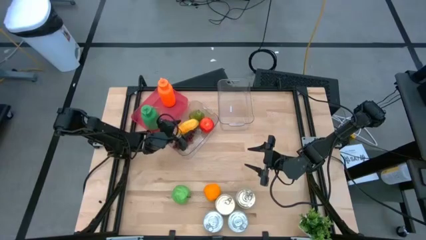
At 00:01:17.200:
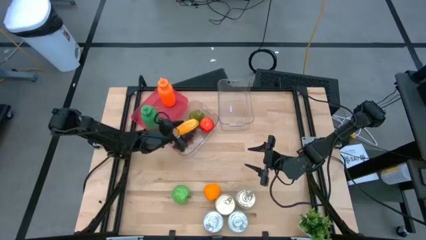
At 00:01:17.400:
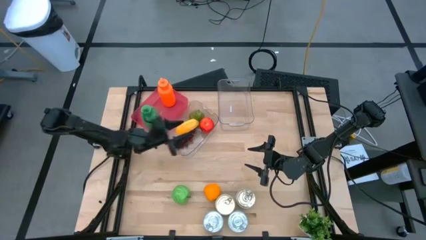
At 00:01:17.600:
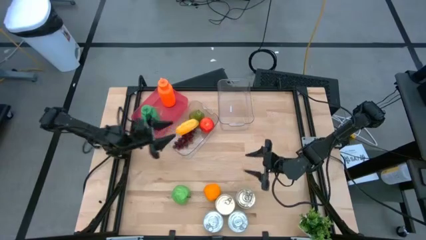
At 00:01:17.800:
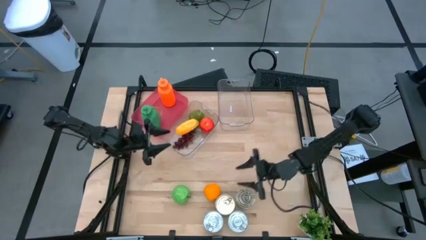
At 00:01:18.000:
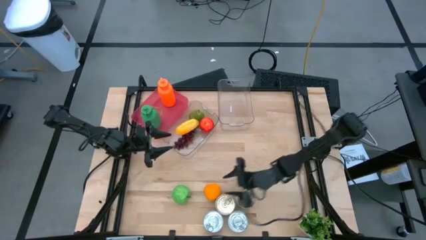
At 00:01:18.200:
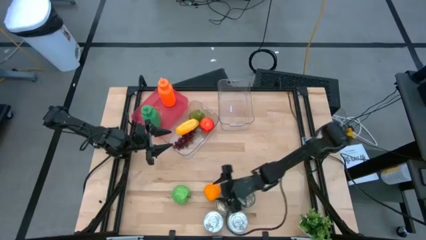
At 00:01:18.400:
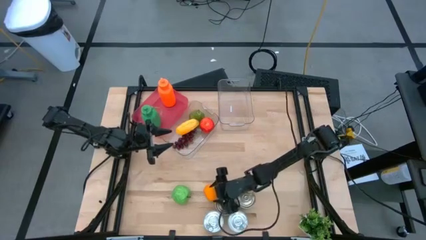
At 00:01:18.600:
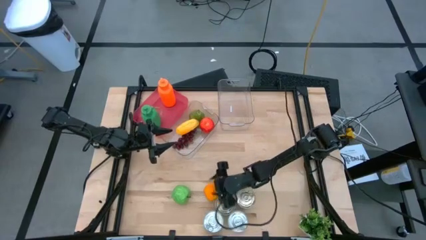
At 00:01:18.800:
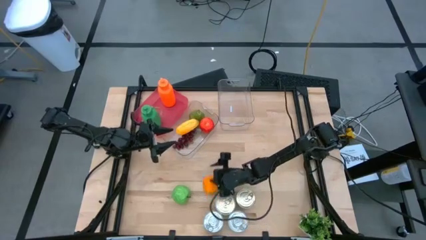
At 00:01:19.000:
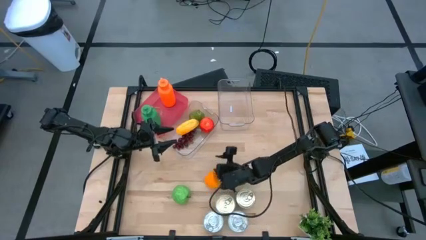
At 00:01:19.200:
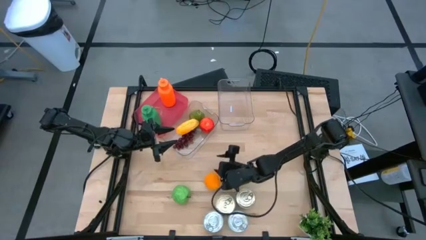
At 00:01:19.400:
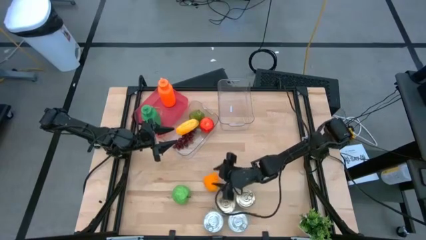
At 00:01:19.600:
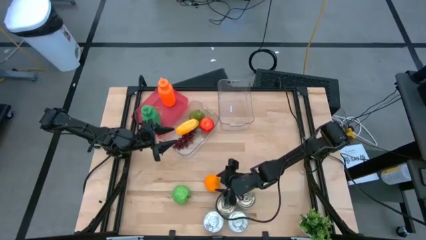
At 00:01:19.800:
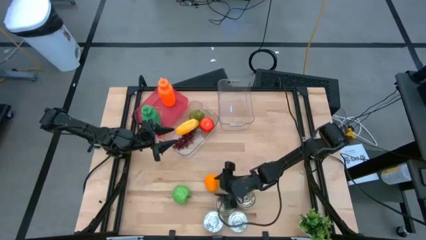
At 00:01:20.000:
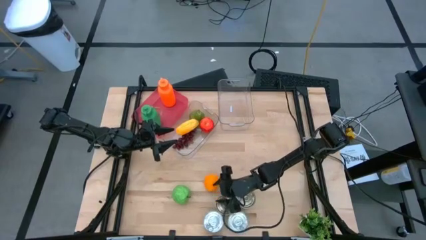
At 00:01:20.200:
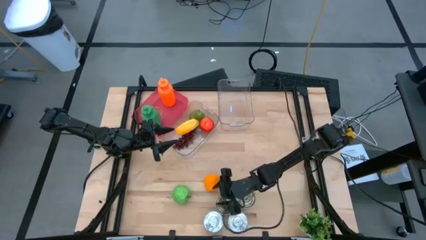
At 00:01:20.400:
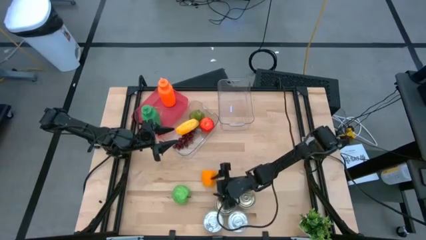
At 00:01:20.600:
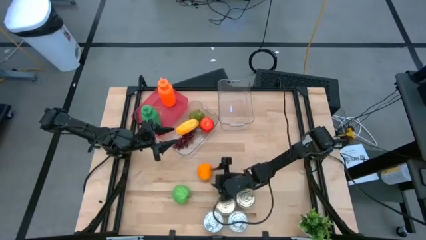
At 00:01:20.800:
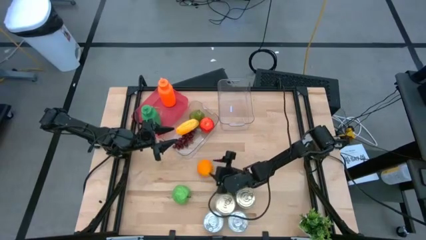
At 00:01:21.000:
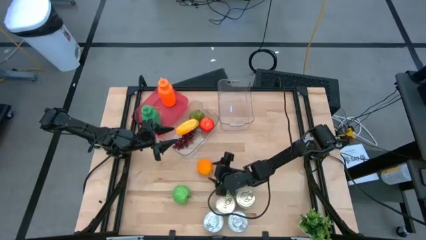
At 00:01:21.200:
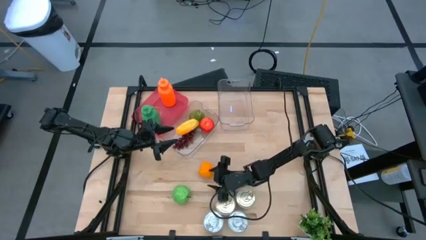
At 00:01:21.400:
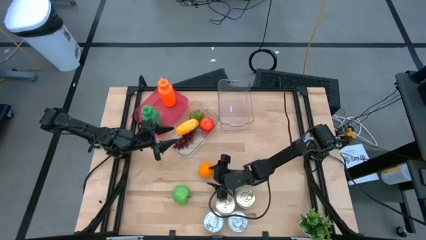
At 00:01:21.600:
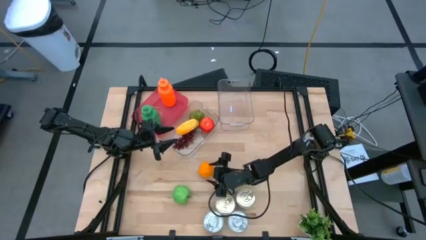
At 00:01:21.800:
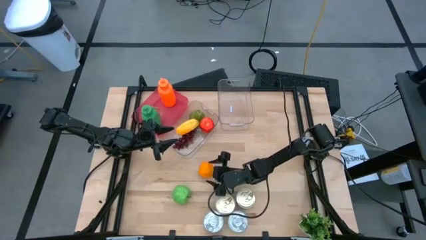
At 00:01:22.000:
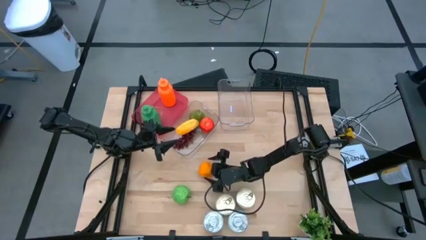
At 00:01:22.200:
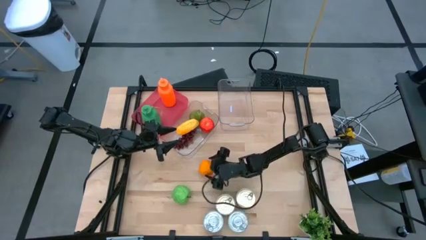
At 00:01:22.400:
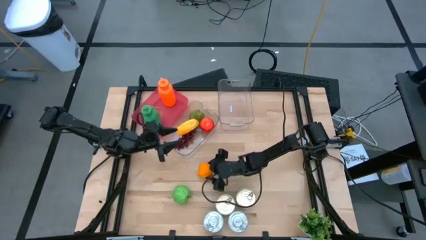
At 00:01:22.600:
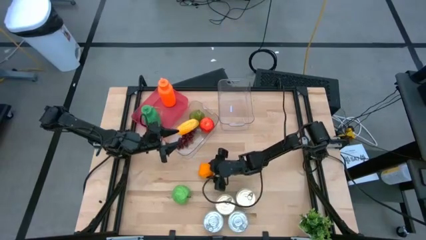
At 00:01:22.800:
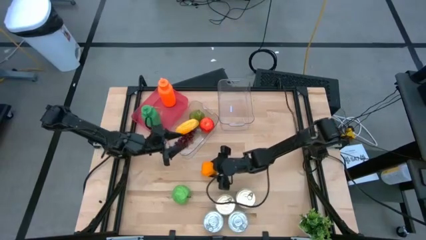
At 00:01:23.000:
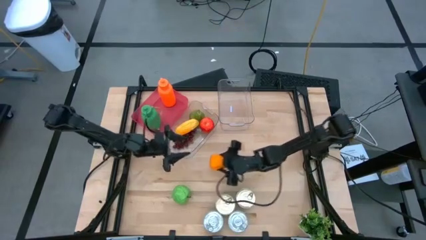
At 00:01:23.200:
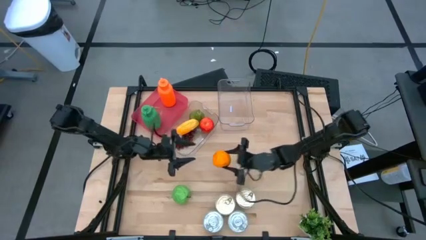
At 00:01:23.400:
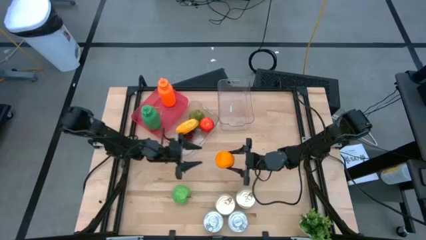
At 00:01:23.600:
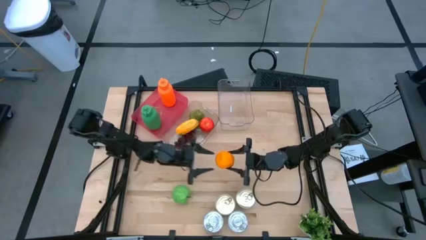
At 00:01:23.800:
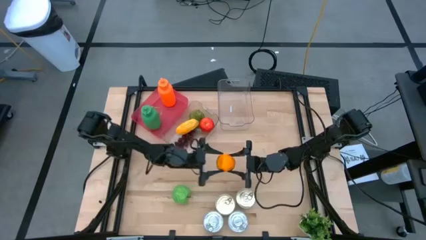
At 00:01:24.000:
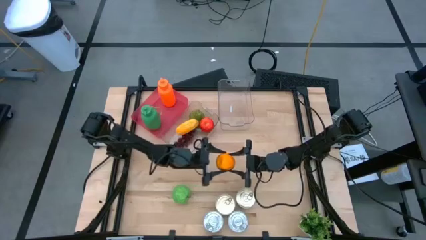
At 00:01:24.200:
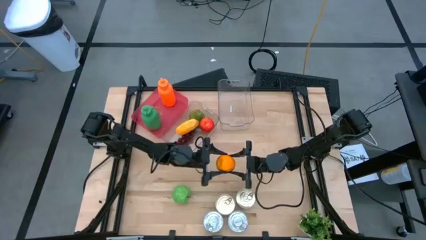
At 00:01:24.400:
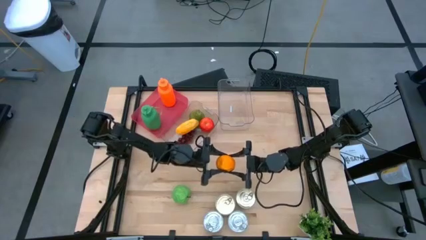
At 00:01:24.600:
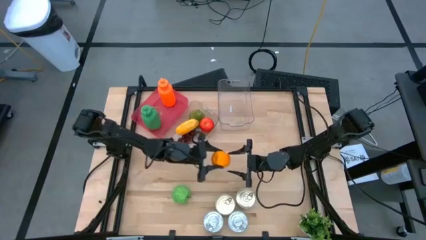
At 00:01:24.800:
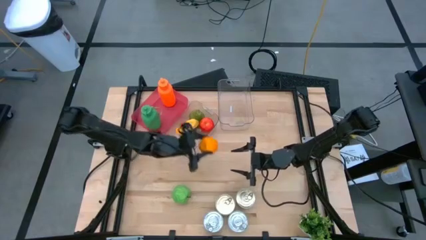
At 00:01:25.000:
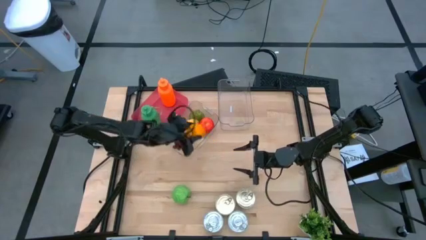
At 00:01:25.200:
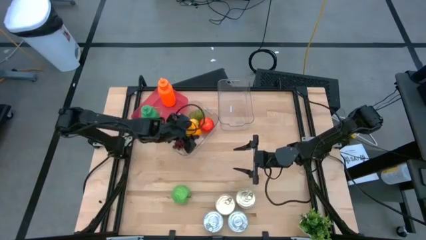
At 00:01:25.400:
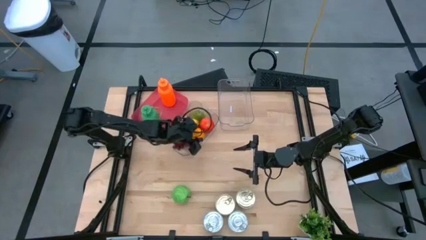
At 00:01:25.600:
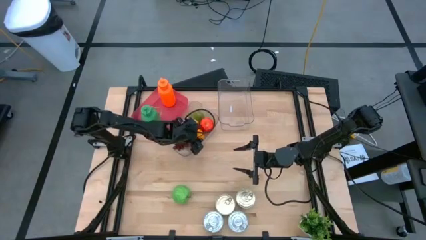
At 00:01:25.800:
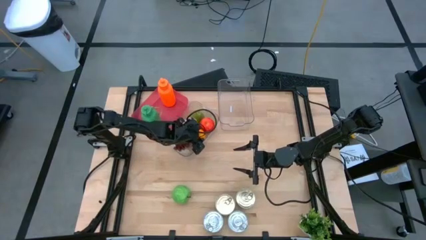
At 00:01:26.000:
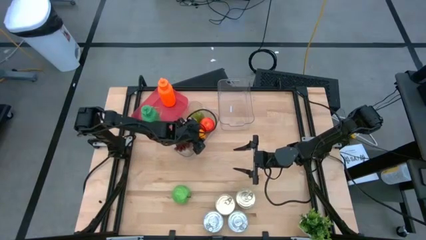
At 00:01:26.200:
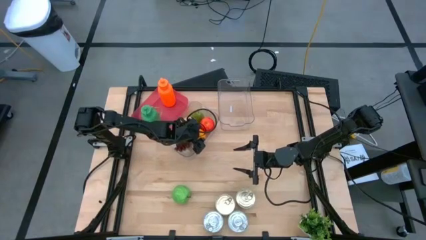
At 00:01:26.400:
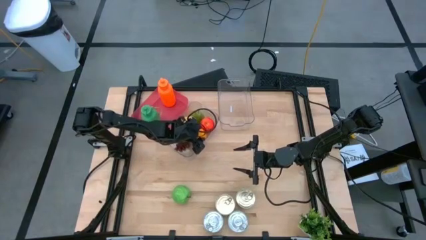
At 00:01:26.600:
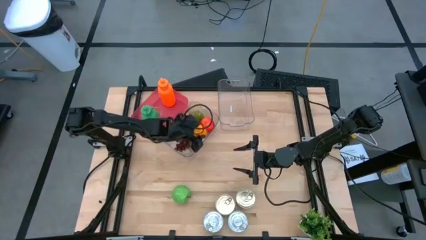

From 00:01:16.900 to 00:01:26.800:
Task: Pick & Place Food Item
Put the orange into the left transparent bin

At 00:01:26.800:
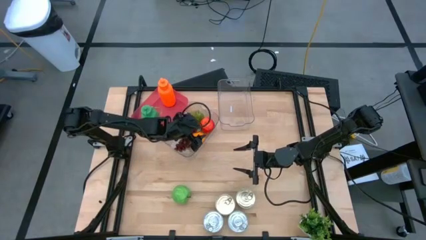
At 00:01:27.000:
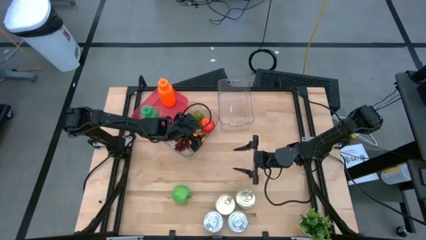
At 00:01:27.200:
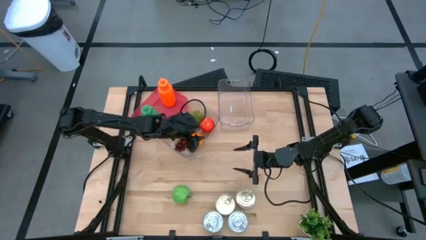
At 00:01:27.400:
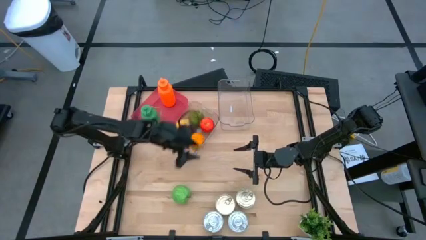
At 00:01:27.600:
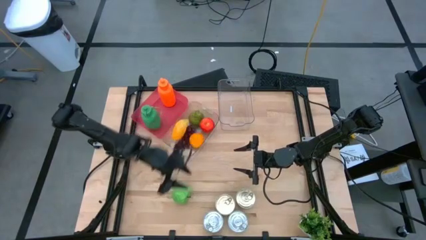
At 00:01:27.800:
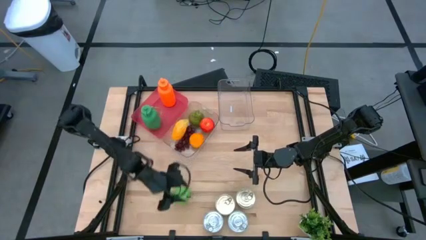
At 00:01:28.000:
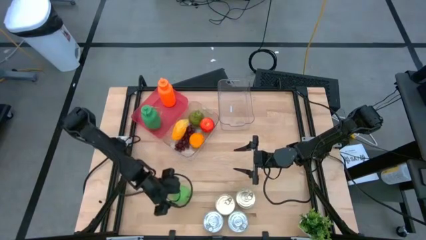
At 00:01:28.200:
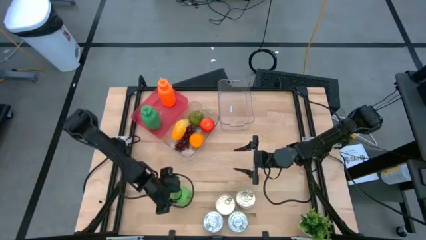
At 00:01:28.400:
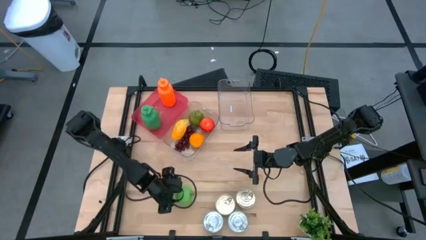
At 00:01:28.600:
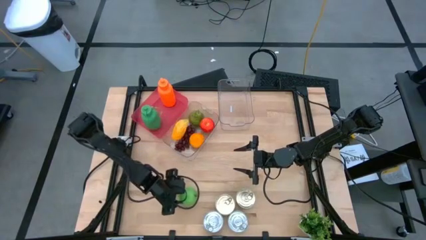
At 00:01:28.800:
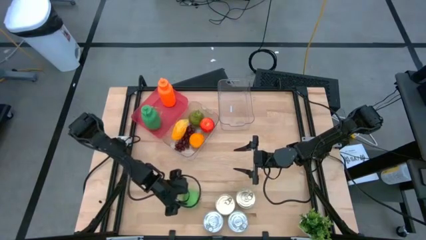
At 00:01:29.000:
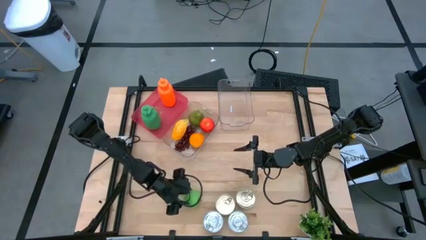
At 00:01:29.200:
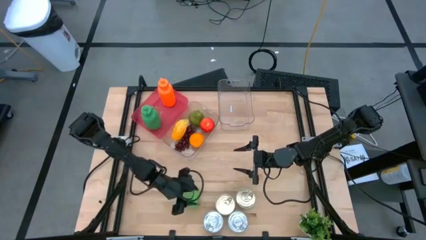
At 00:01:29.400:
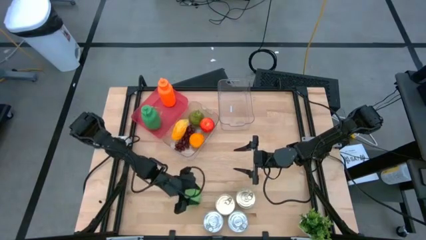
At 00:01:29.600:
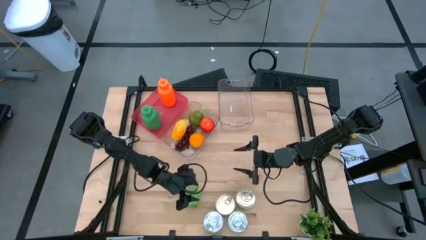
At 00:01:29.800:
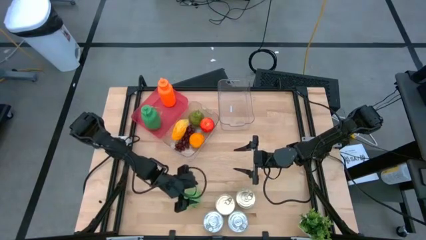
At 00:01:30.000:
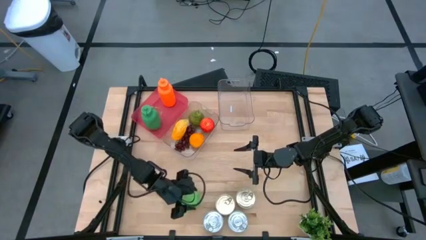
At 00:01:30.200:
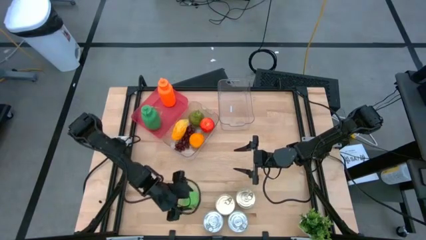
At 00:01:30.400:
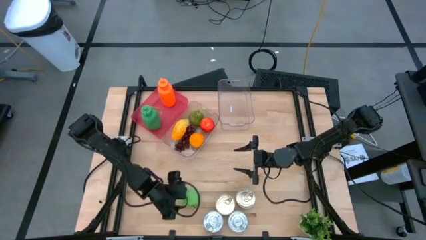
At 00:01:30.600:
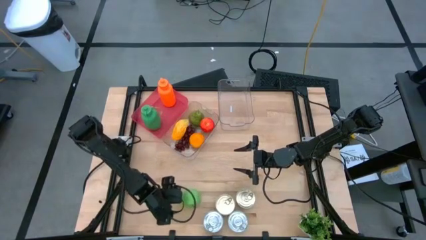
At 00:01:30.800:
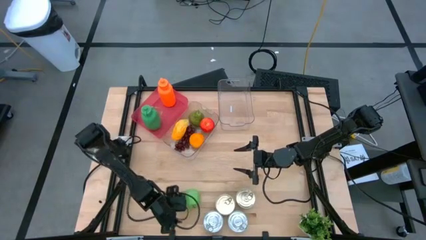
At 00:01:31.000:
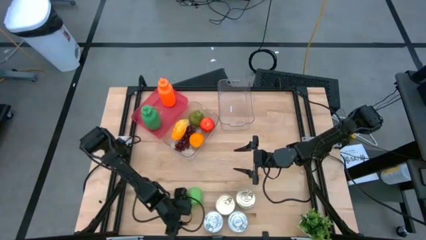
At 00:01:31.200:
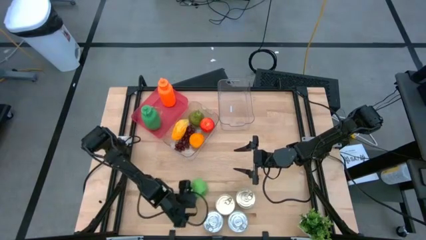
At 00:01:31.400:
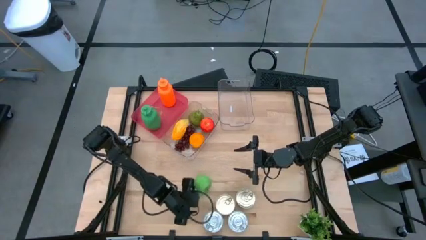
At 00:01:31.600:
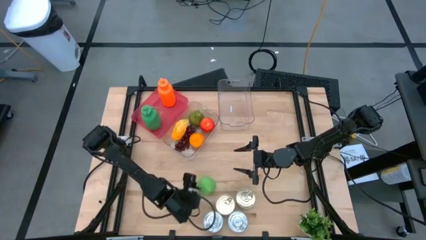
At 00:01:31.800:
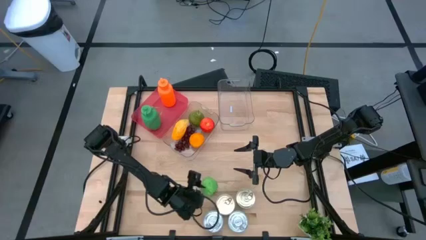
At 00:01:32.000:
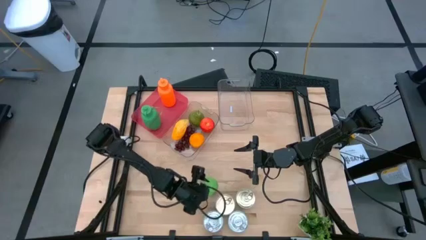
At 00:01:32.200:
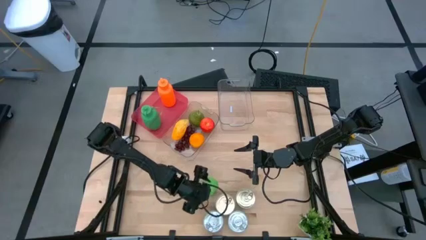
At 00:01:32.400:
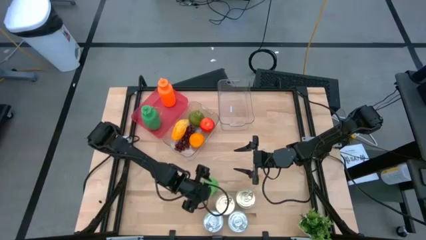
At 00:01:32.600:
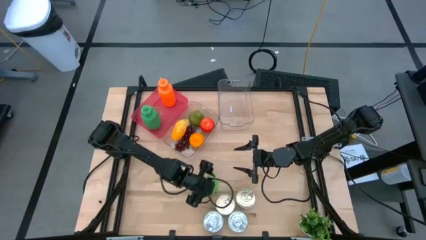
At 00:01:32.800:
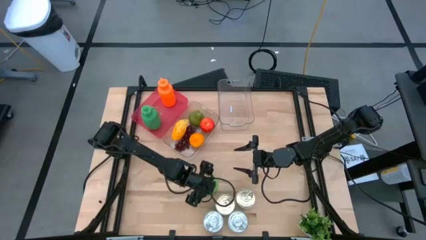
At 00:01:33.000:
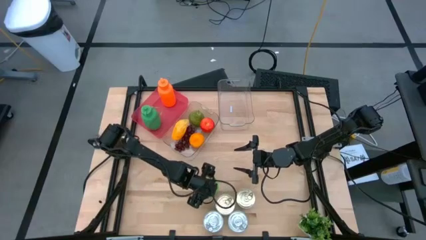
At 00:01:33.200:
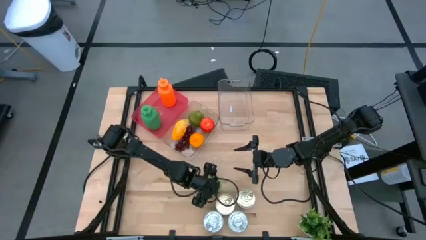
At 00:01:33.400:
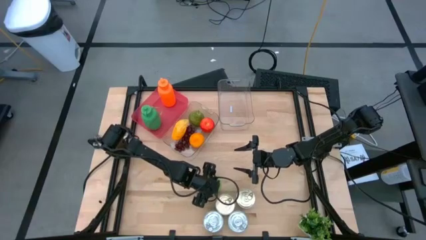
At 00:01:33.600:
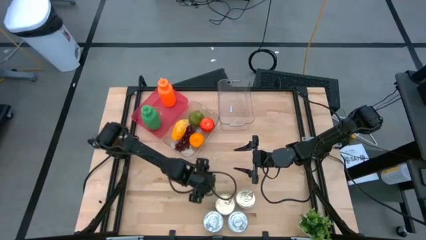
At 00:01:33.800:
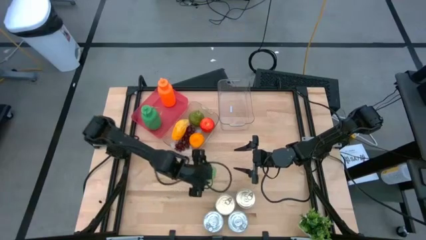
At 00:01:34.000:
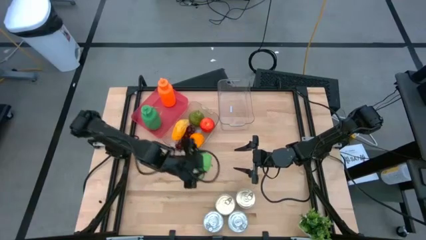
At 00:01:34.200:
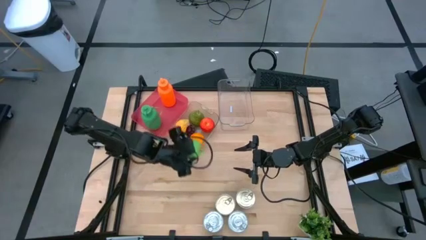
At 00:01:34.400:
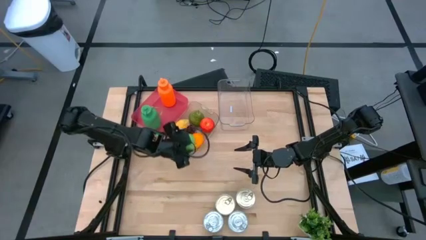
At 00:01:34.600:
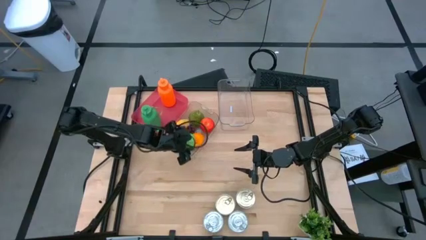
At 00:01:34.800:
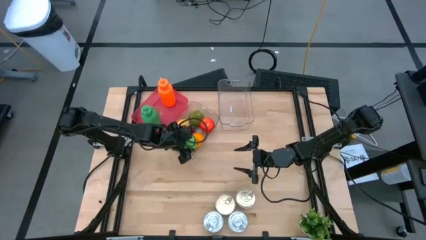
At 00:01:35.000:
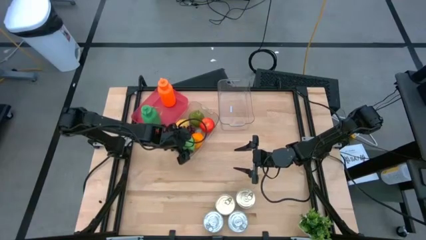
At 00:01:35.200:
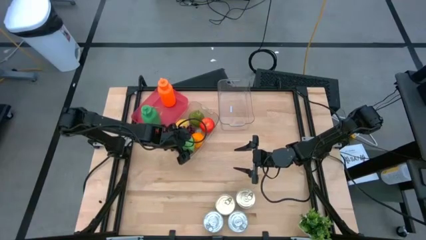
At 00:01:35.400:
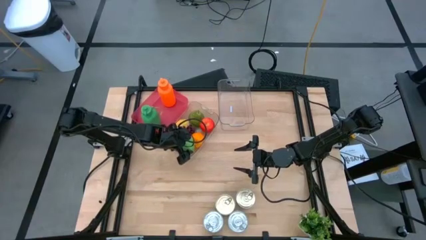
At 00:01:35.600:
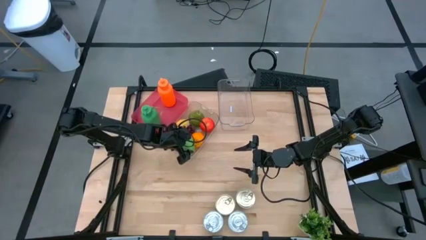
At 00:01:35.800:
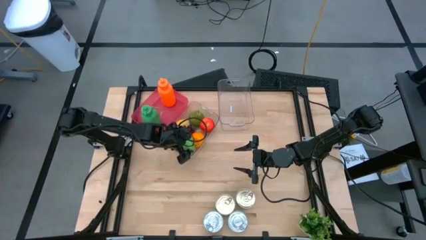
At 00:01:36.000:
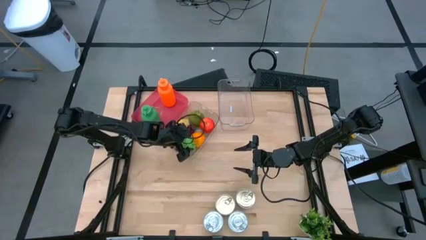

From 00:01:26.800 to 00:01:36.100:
Put the green apple into the left transparent bin
